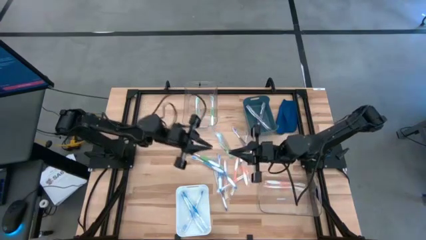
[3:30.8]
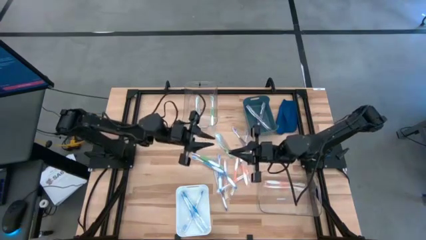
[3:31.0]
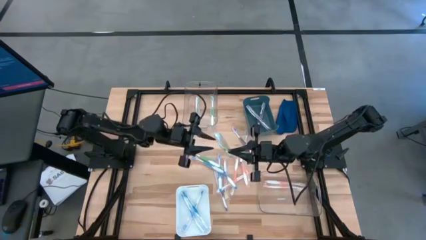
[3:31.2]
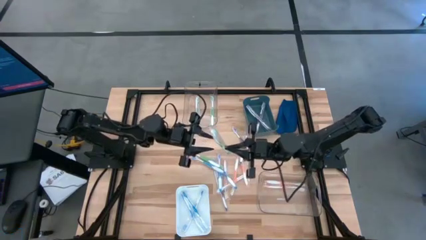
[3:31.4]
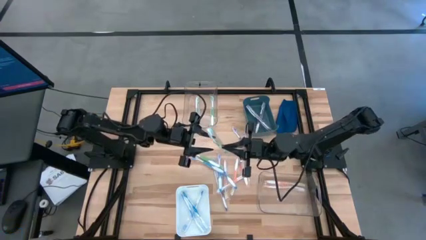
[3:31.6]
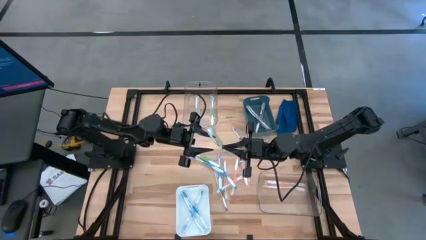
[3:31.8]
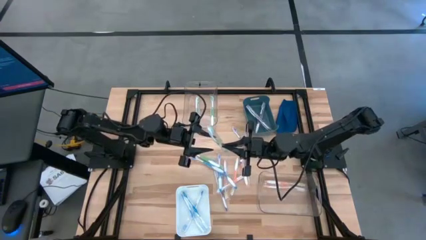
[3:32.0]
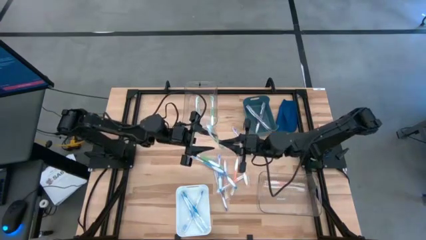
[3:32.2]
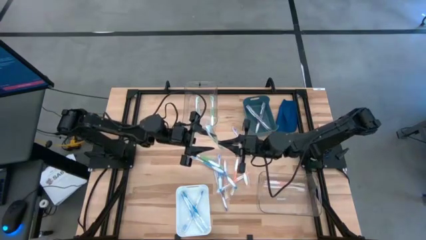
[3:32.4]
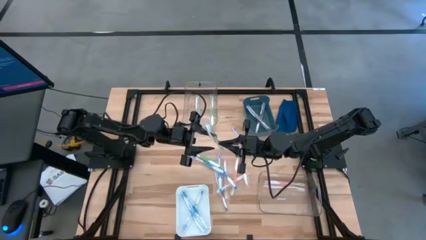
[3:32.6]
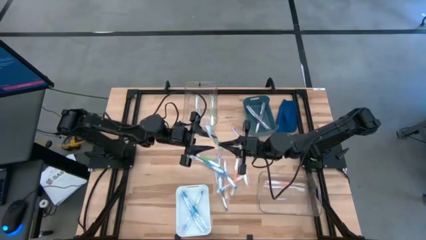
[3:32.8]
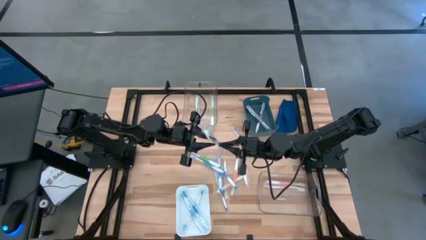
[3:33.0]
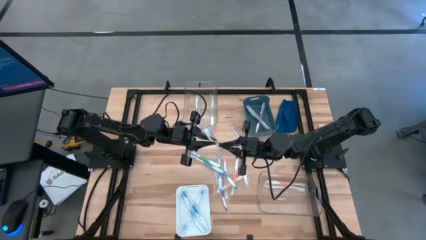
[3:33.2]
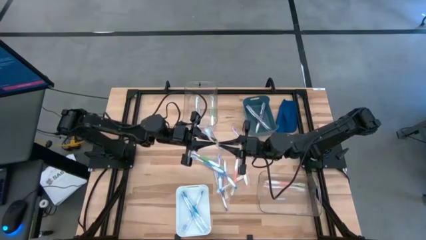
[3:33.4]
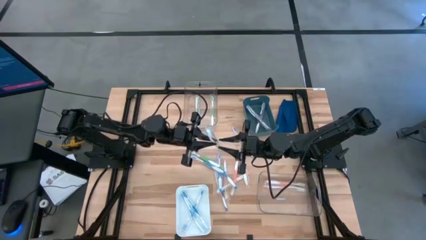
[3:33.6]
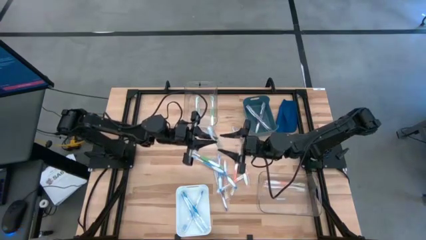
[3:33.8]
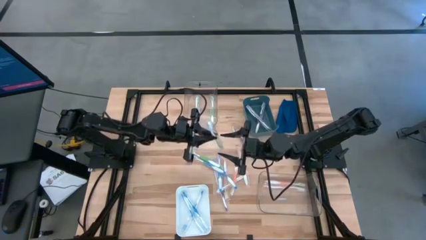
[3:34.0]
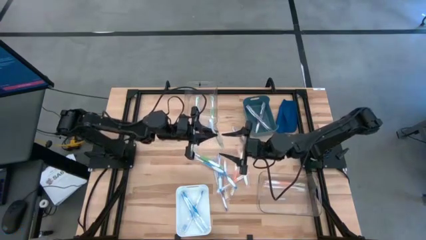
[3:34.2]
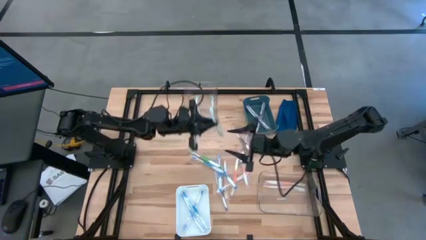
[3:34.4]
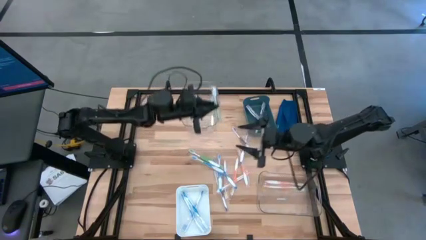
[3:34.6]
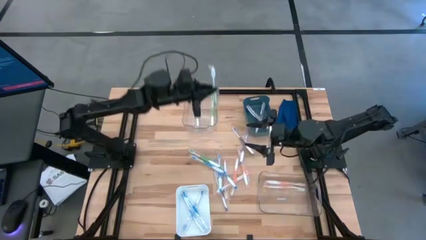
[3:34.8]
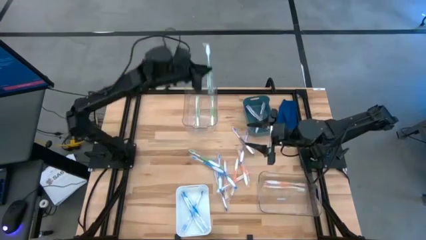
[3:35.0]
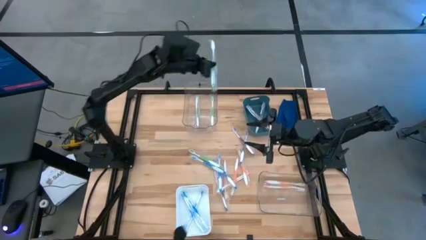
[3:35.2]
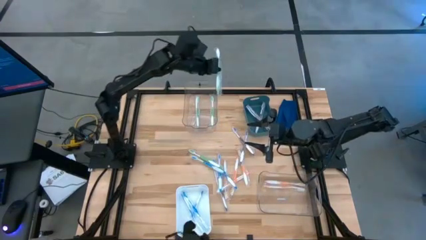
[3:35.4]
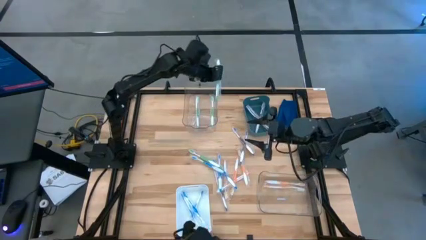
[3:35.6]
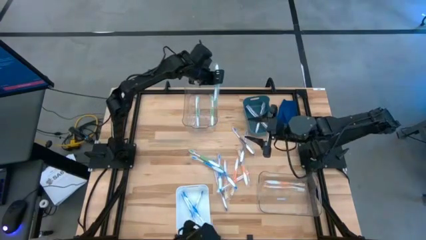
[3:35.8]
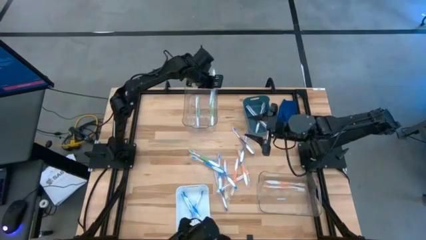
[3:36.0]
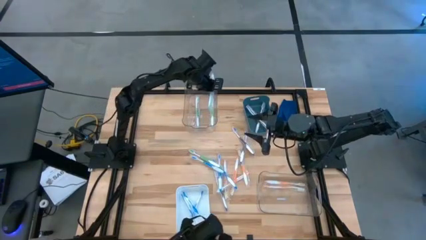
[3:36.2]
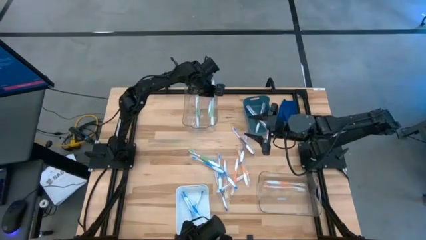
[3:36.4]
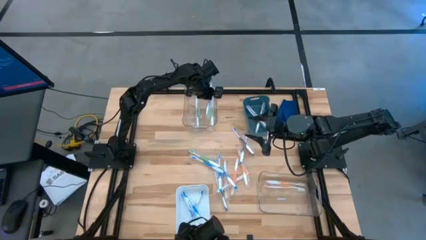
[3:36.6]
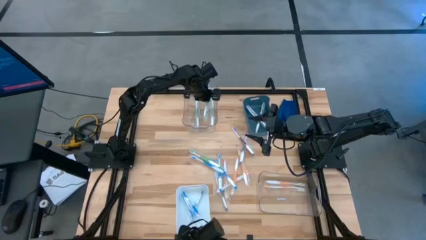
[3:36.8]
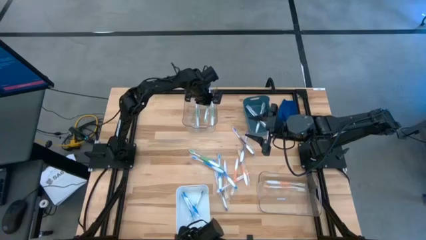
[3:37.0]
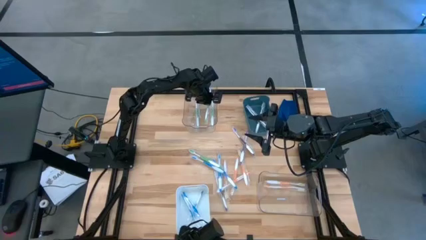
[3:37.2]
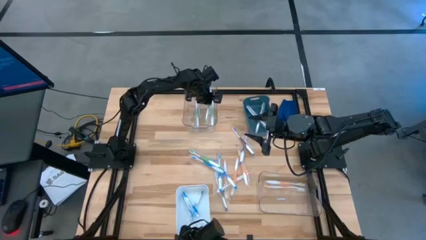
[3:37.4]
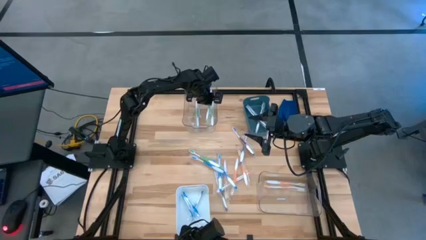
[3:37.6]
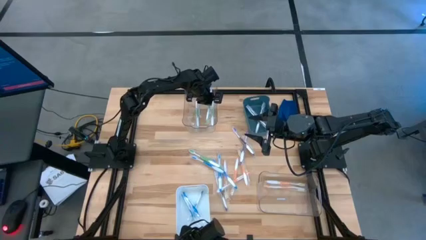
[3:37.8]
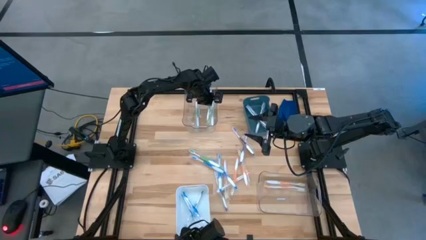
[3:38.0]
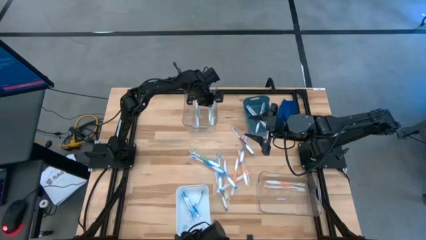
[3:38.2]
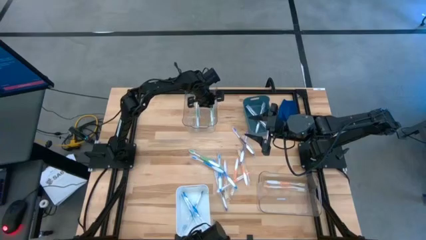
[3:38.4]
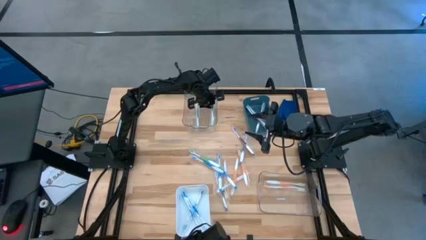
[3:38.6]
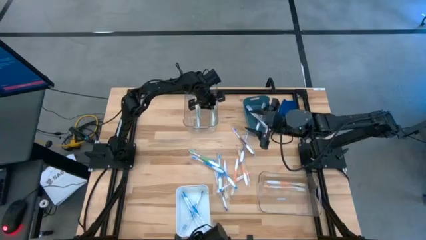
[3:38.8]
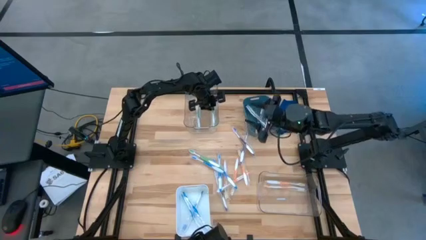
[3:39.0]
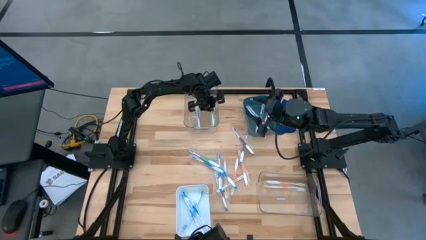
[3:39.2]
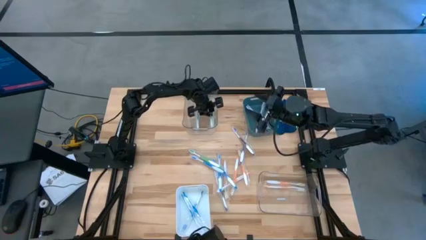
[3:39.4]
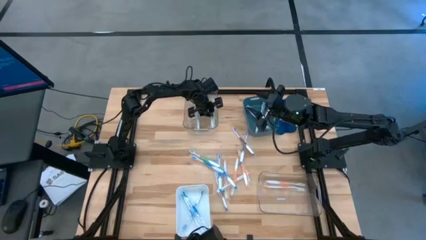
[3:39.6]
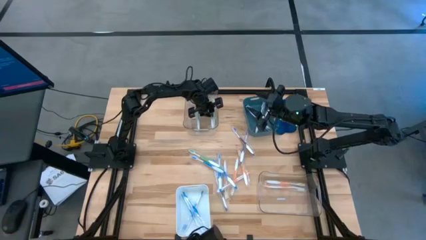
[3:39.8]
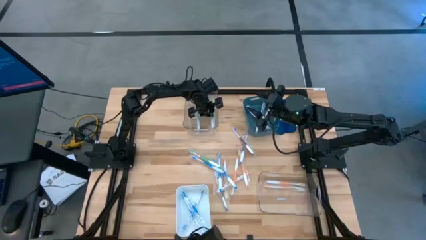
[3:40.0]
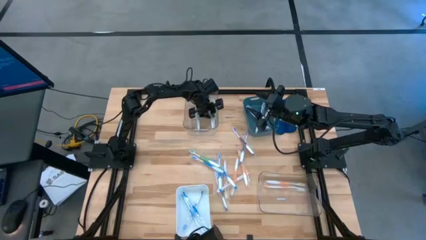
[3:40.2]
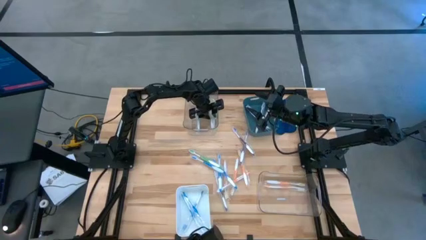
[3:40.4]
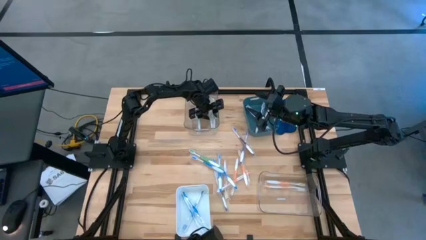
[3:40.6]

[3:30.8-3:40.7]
Task: Pick & Place Toothbrushes
Put the green toothbrush into the top transparent bin

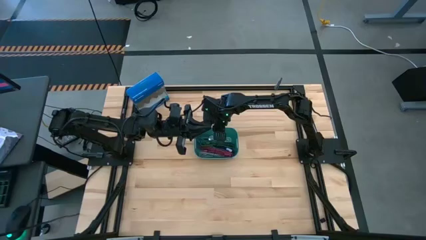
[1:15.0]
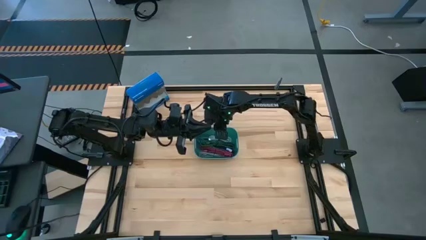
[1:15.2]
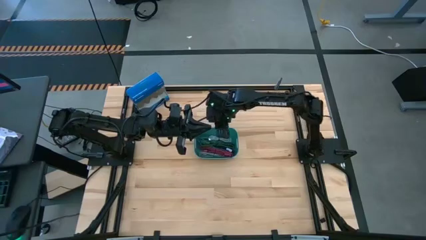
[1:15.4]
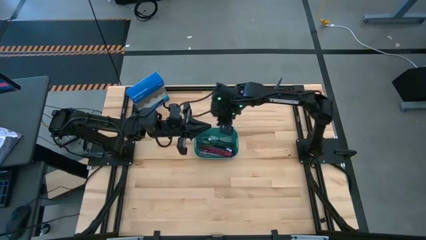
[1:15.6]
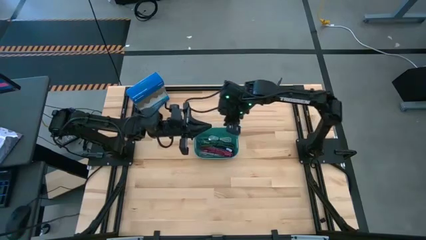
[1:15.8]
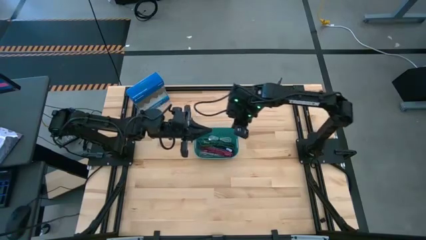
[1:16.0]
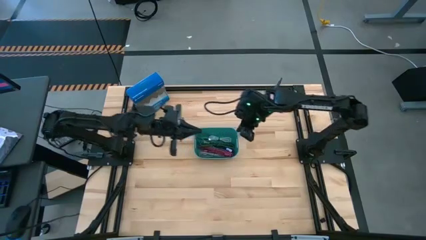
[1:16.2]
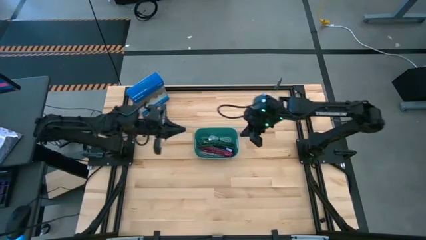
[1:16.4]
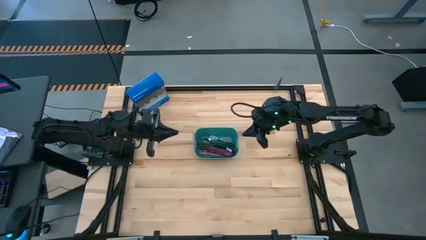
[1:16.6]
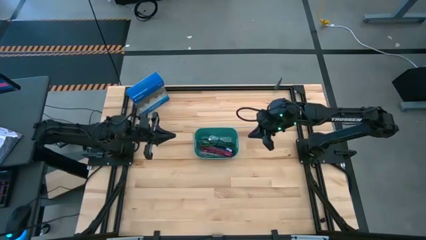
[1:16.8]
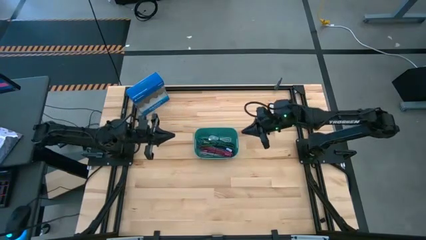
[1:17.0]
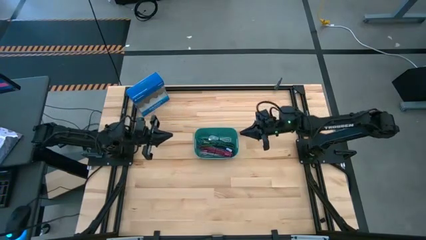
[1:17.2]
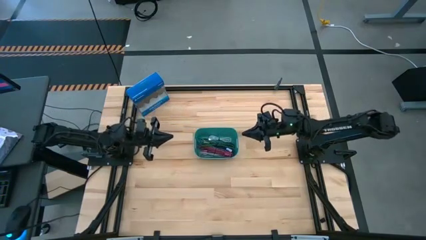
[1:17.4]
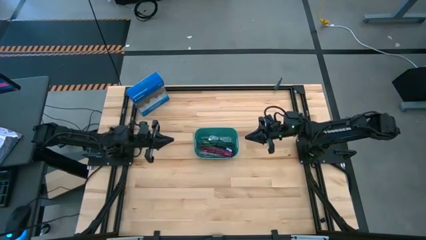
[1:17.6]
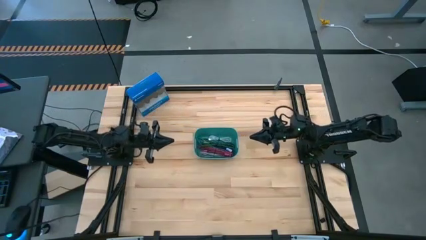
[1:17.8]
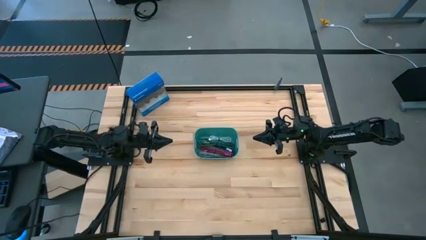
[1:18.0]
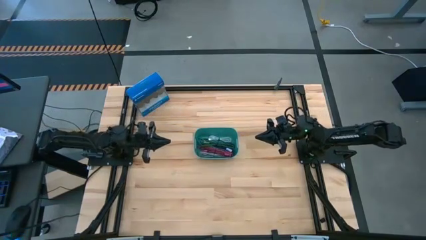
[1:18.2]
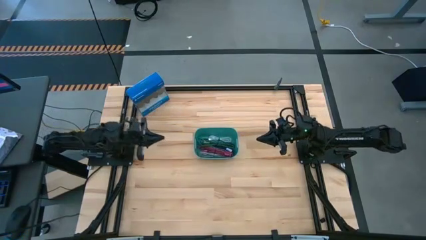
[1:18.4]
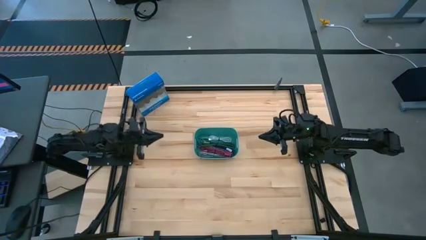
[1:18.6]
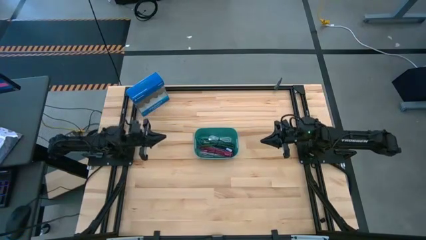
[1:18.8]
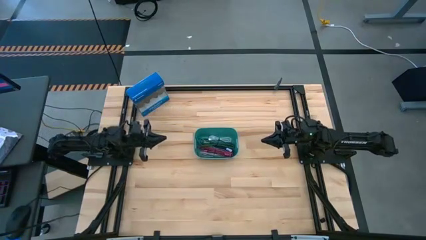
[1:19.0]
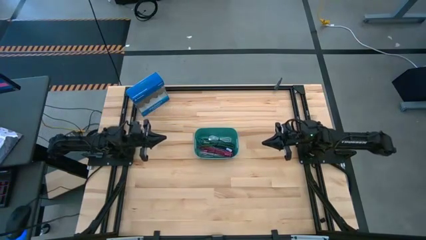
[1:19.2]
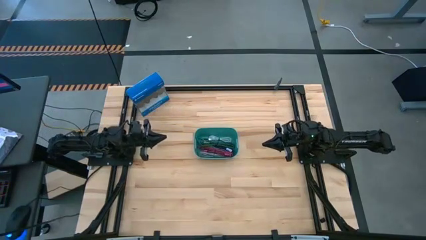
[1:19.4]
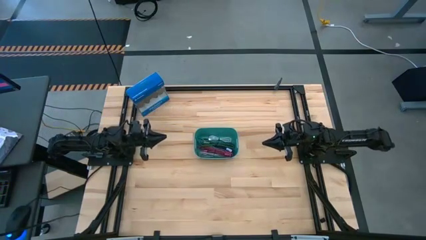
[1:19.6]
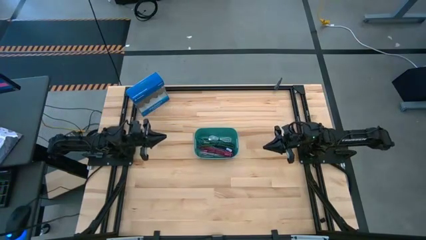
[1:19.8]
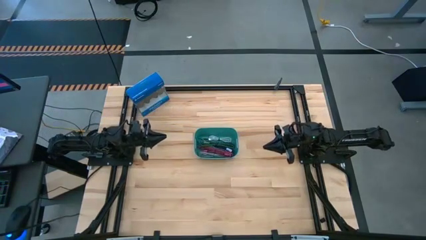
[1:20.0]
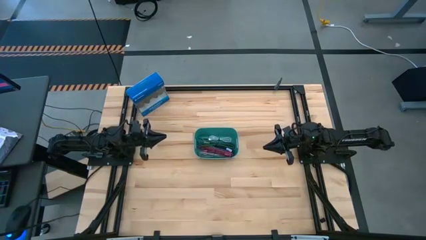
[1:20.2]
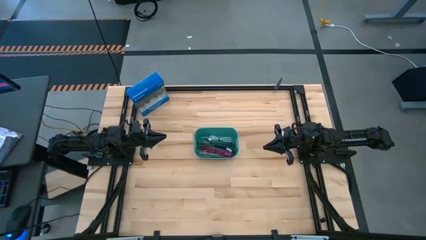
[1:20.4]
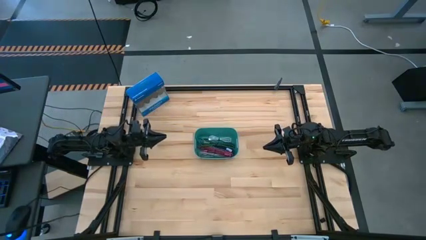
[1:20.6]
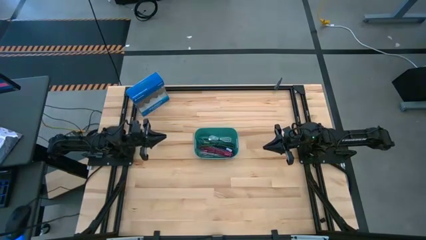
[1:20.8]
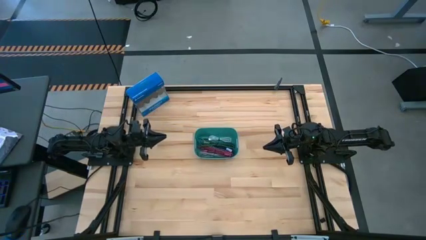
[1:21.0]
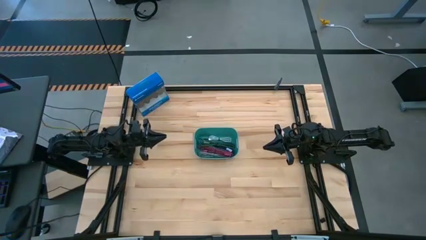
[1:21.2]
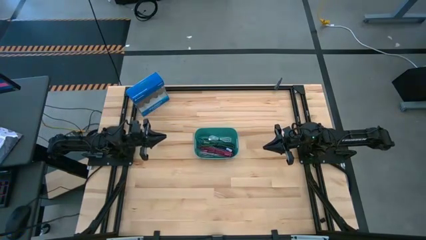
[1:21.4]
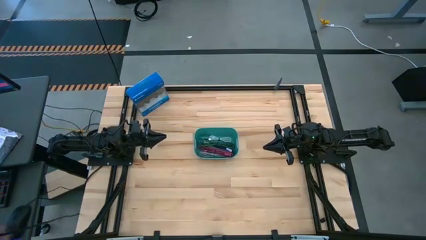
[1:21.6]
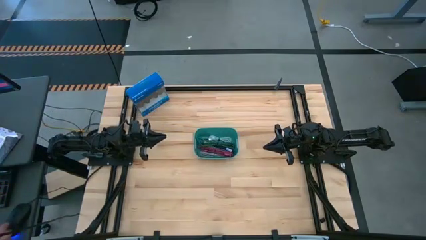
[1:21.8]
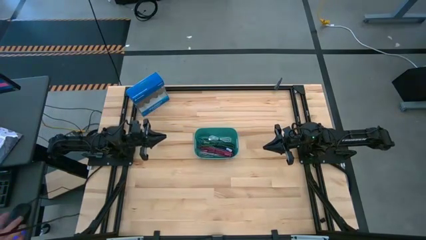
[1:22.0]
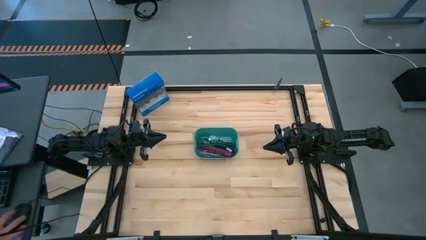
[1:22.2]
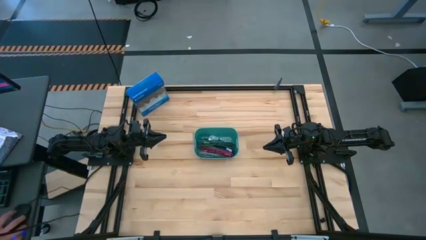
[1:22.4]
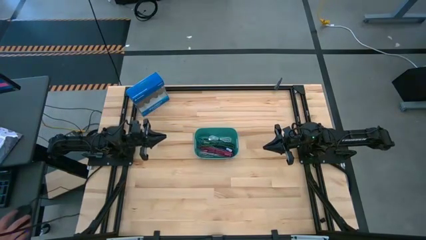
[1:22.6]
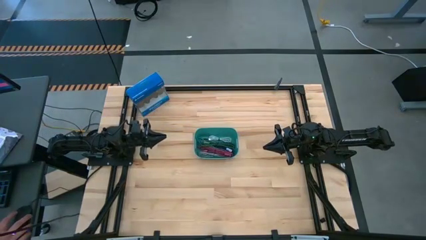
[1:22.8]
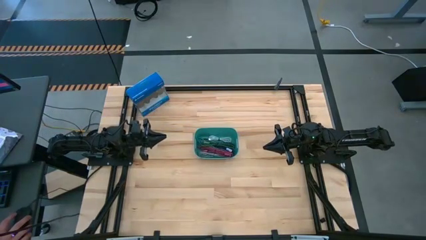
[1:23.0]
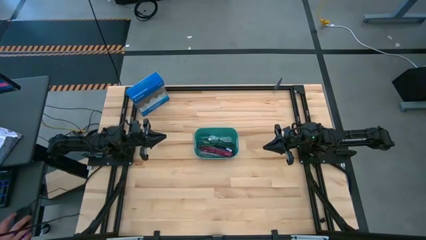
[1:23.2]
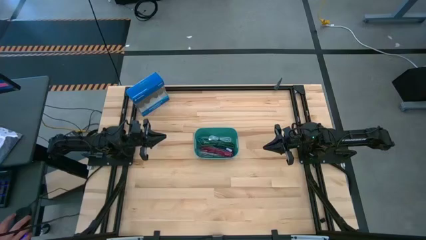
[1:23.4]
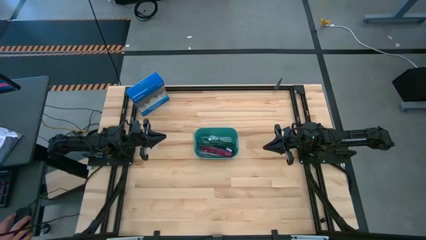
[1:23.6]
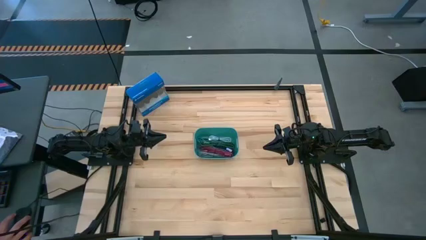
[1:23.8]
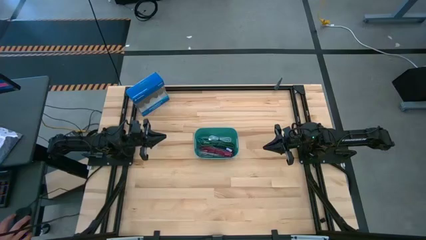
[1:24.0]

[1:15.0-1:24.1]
Task: Pick and place USB-C Cables
Return to Home Position
